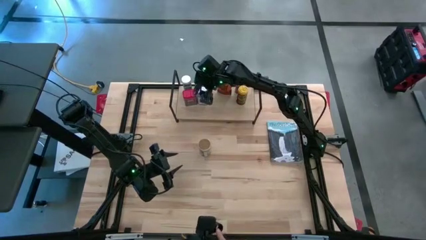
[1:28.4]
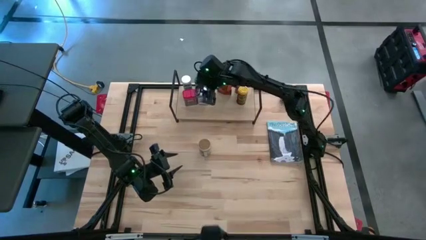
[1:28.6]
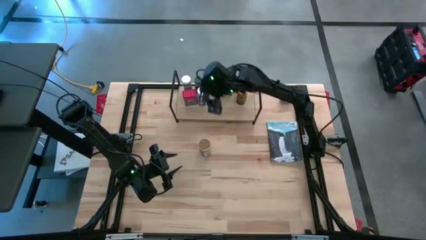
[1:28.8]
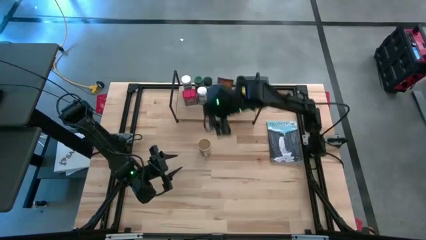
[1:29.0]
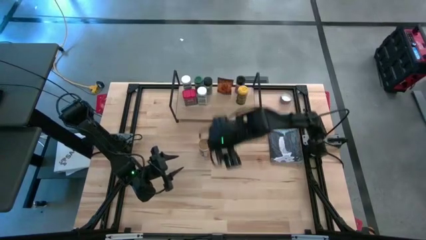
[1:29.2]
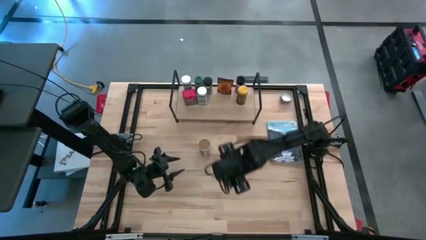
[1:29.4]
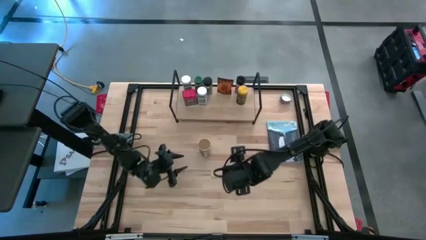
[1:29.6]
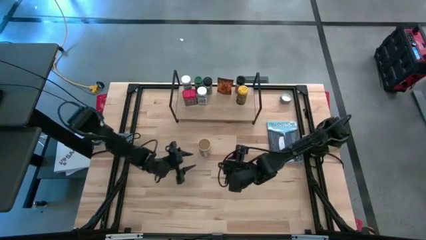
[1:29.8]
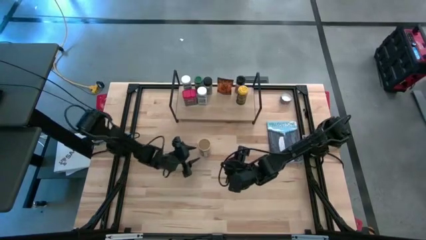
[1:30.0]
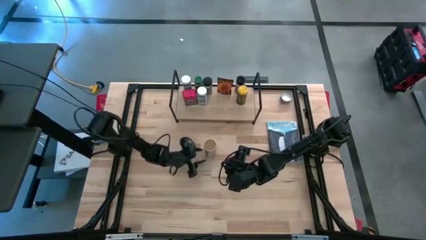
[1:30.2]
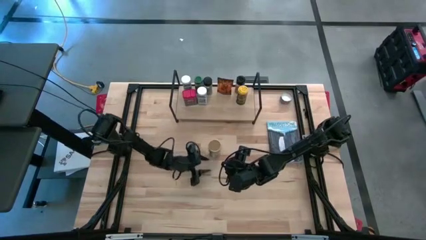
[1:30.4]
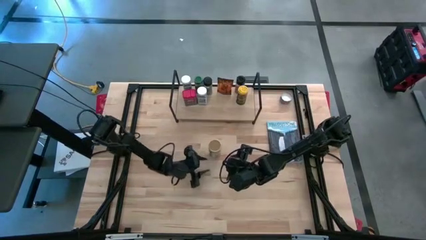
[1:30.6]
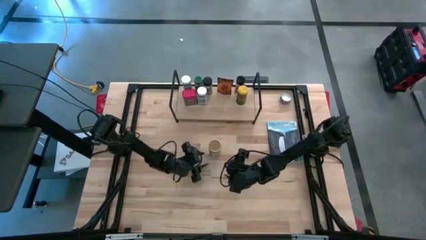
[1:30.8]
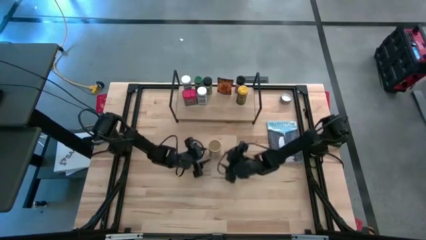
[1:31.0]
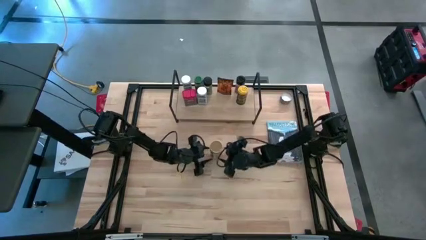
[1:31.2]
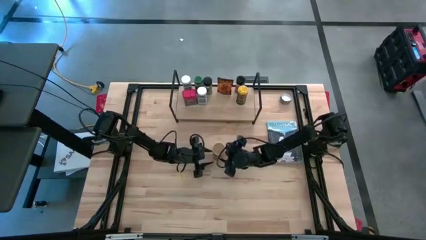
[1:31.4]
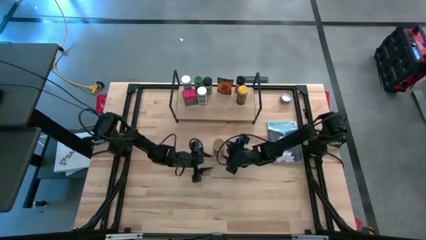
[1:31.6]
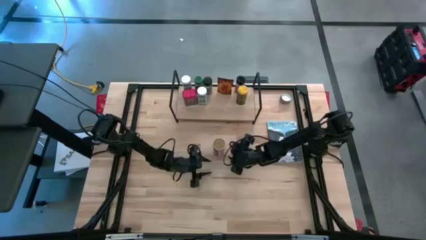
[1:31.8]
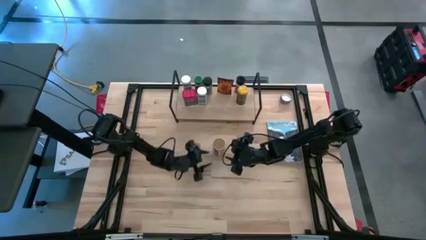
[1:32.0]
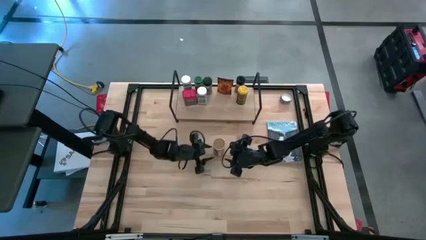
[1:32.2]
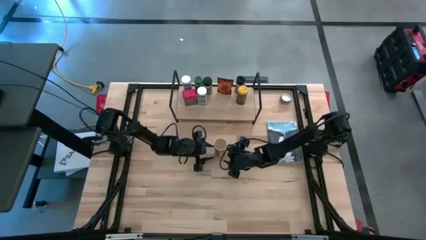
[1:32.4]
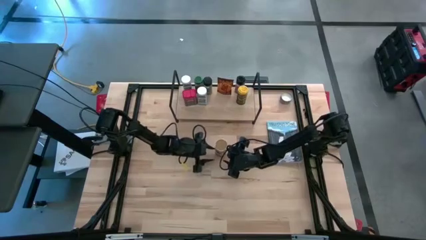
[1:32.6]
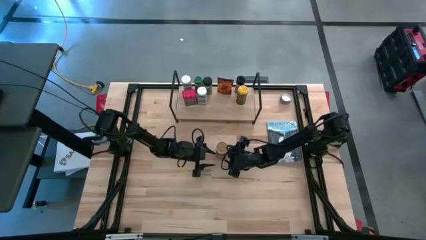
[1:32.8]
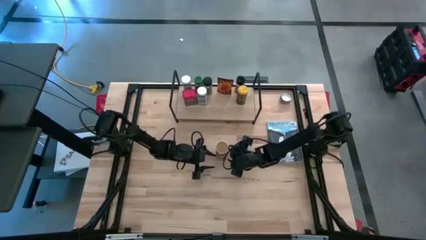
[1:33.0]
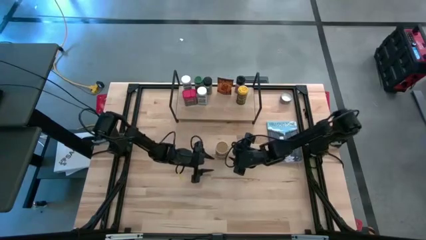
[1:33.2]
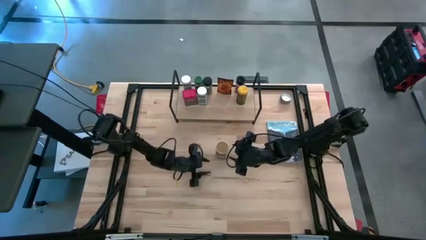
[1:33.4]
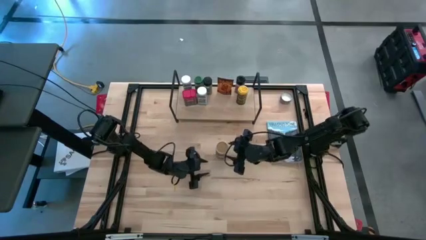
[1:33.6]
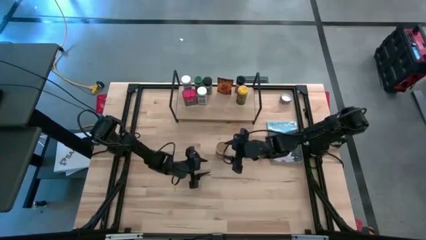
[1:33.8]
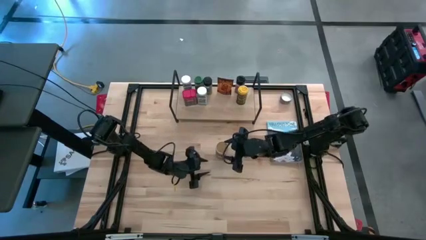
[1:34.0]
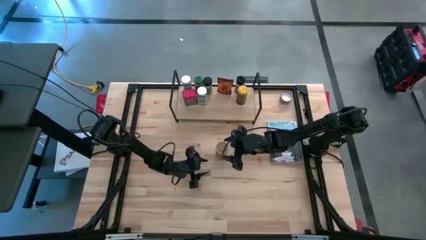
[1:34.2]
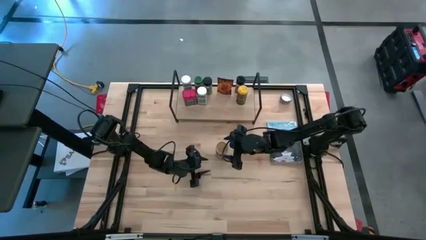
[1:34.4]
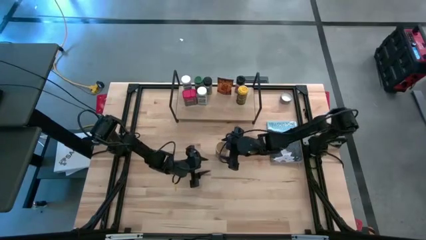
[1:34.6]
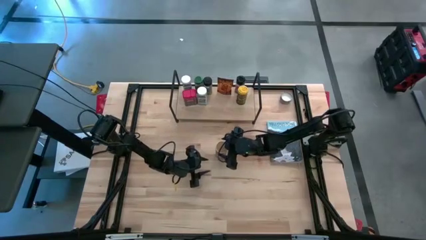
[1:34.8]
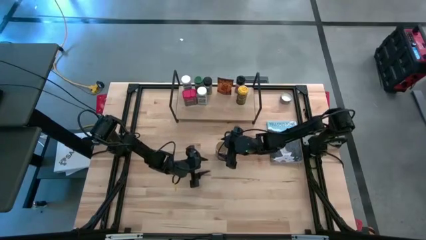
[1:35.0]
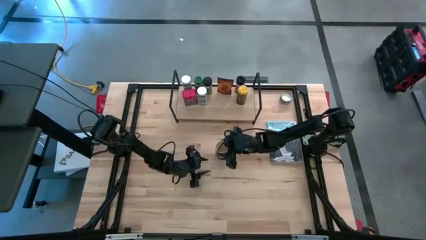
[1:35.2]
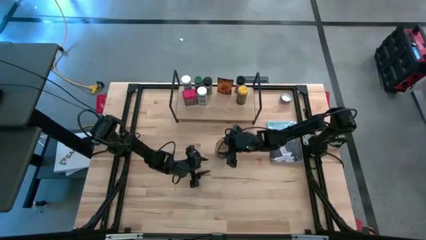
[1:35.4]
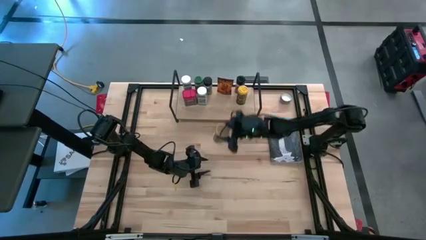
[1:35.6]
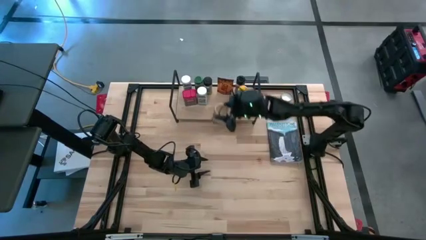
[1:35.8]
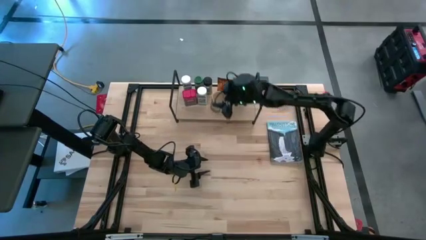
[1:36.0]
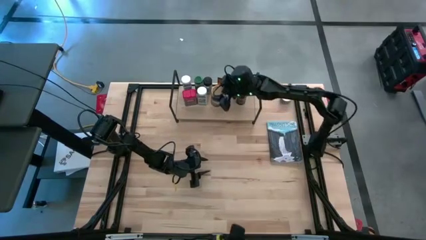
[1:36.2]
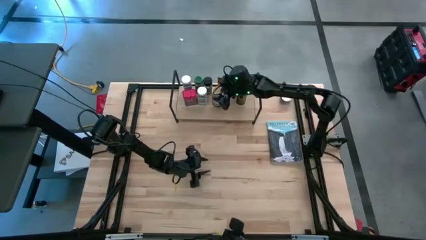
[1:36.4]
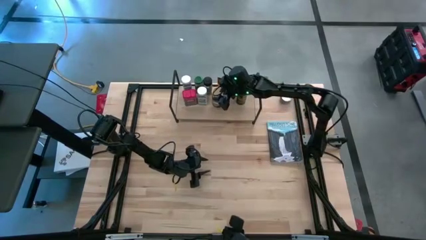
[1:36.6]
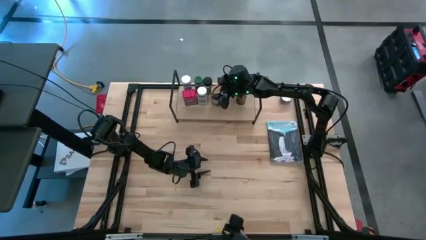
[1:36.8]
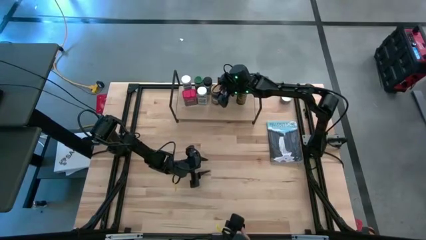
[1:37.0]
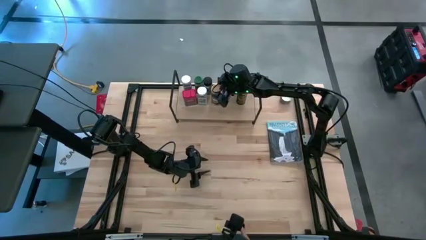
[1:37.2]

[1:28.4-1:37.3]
Task: Shelf spices
Put the gold seasoning bottle on the shelf

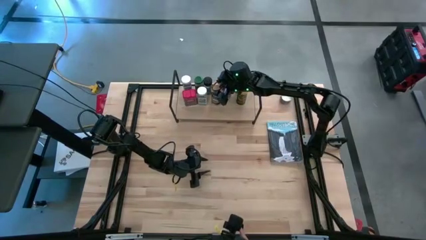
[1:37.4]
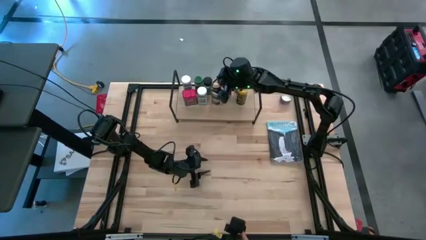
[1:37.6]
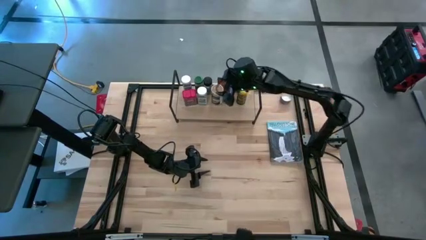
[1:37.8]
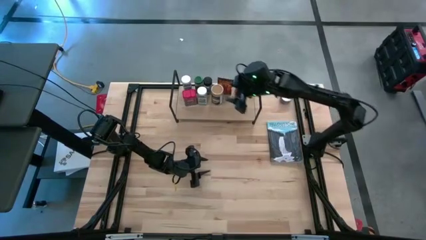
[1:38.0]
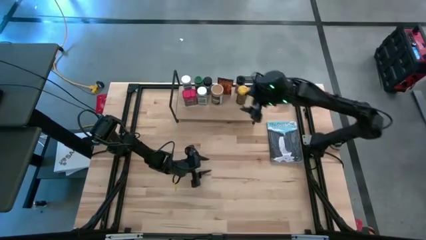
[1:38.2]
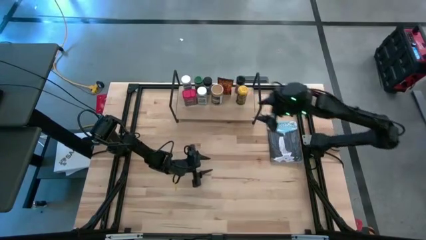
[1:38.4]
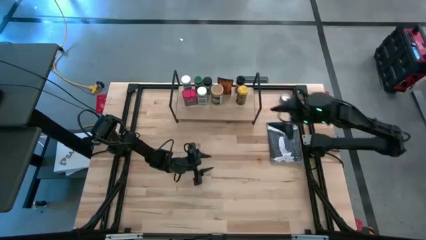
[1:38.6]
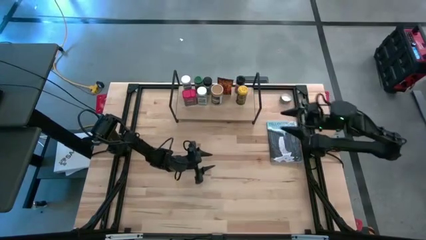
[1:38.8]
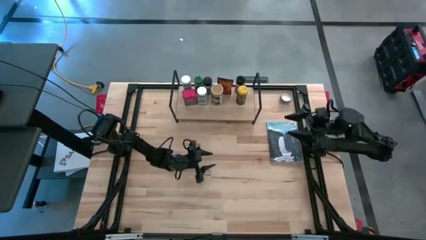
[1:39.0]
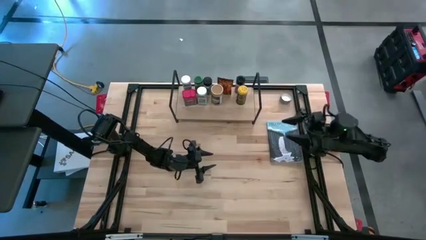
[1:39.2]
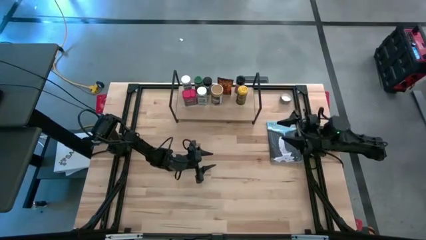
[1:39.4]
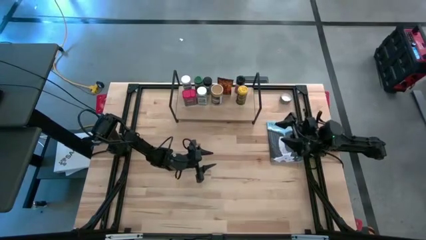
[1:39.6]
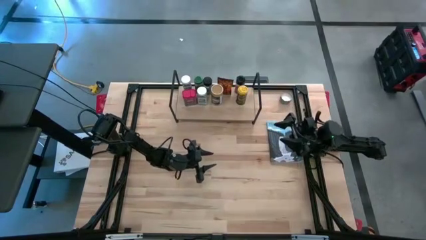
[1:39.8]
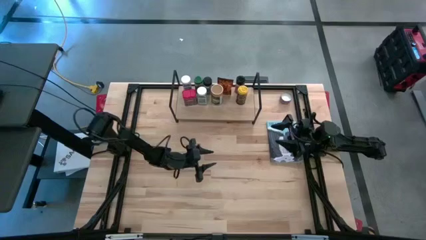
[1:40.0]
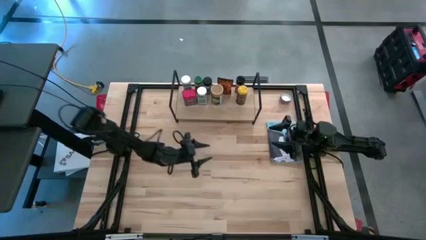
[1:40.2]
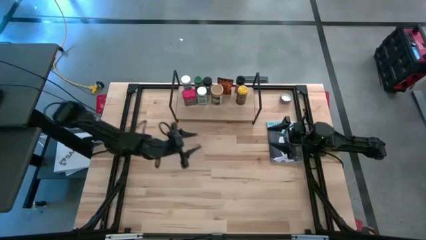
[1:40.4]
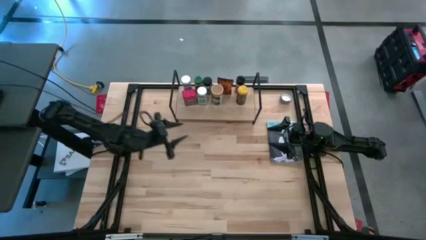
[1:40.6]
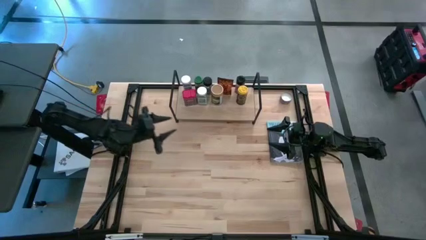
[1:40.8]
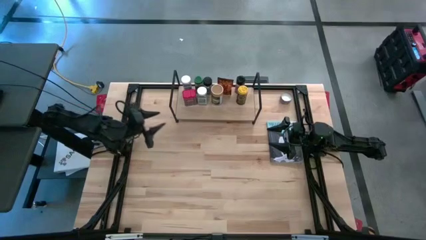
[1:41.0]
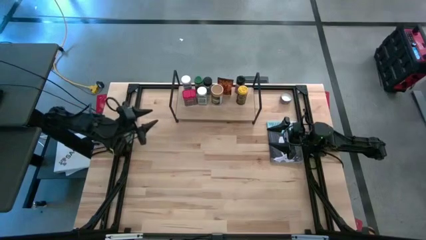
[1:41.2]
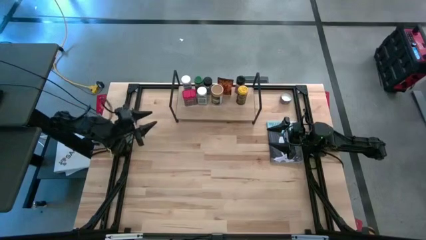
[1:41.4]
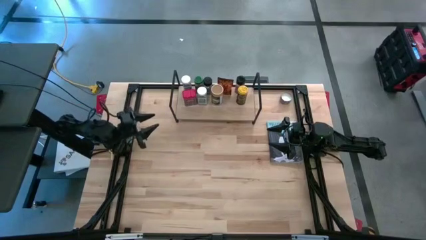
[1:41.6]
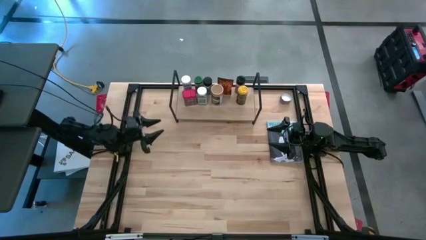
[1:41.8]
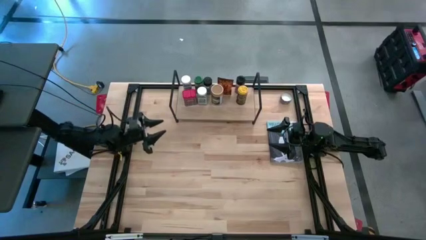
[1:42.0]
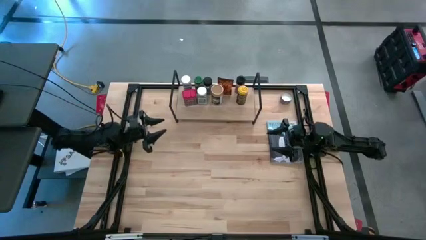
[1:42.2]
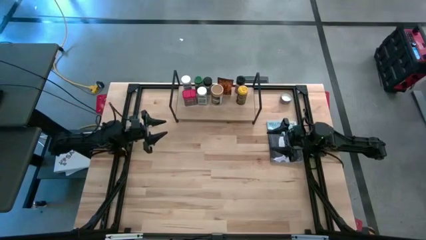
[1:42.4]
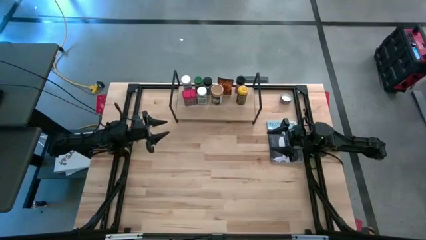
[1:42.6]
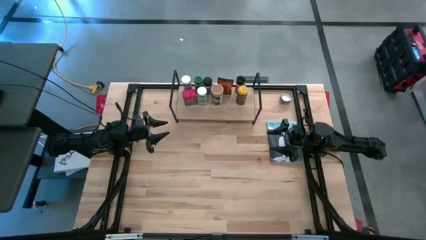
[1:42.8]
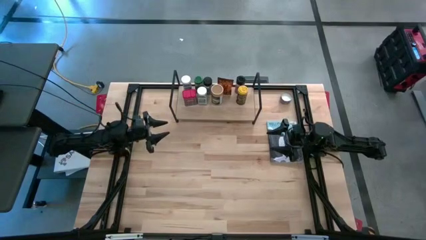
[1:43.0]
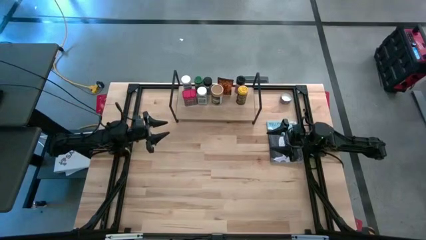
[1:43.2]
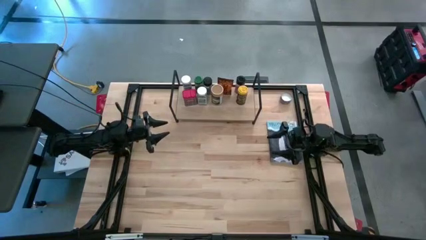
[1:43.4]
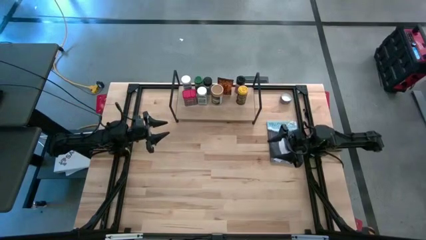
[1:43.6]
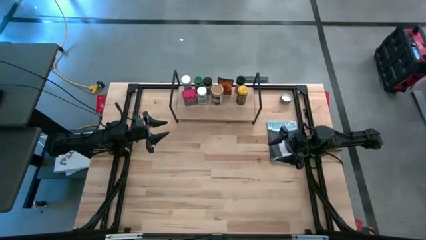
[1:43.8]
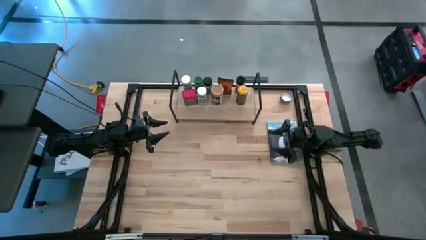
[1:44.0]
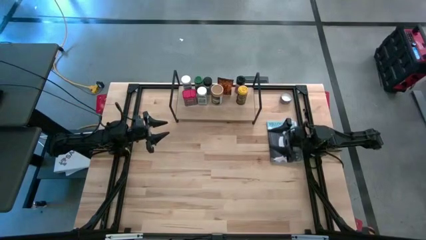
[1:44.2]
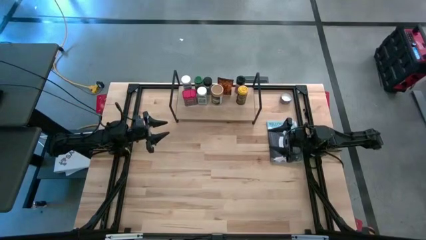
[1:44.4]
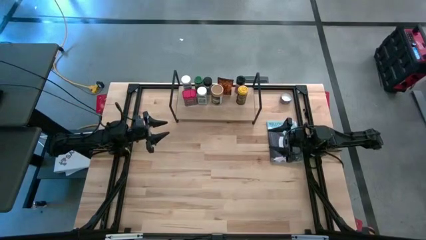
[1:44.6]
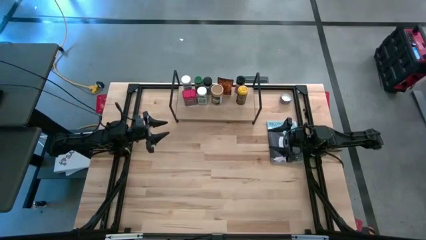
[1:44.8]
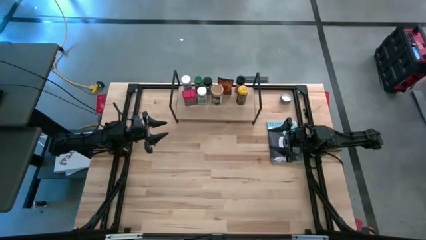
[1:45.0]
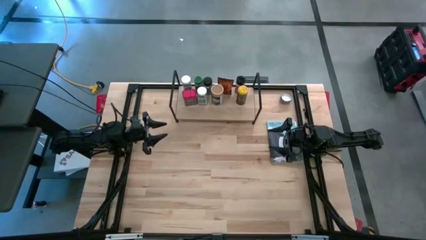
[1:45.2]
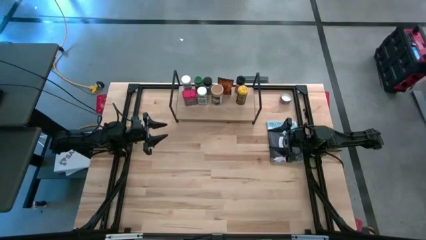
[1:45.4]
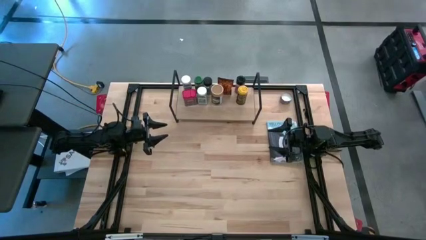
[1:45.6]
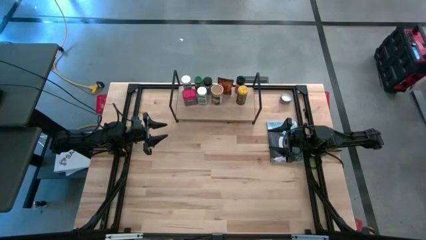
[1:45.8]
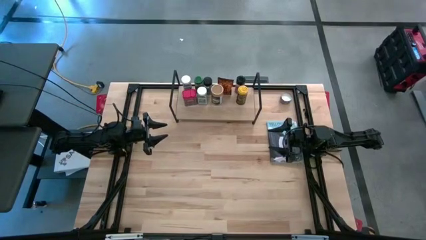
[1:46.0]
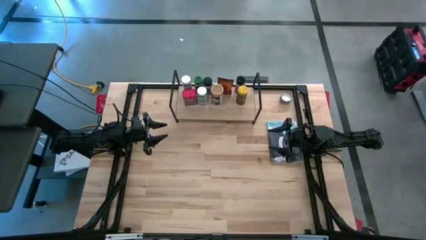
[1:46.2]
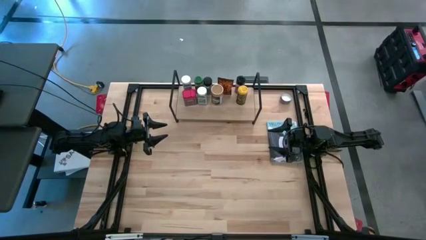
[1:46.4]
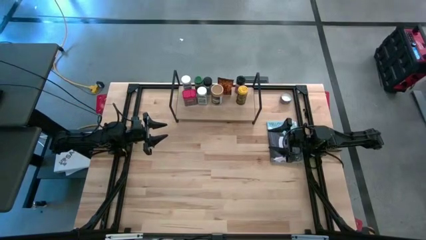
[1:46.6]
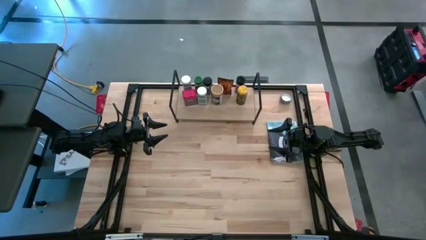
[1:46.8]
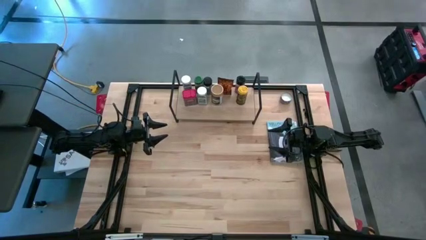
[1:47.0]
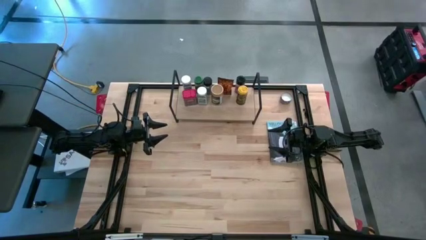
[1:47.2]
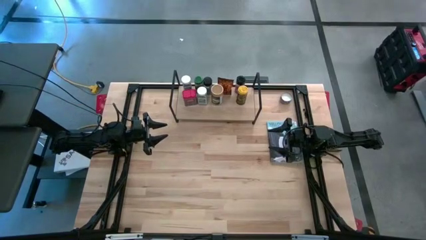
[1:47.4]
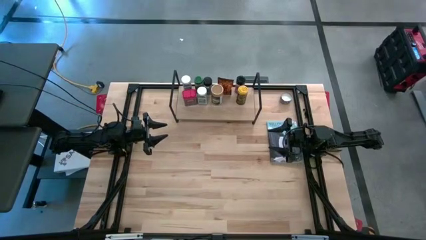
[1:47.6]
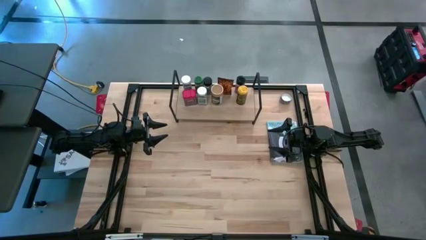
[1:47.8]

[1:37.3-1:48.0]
Return to Home Position
